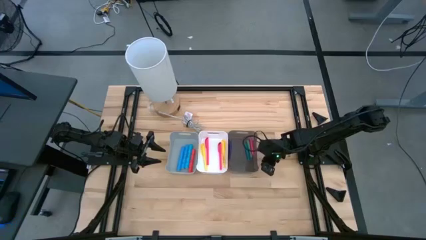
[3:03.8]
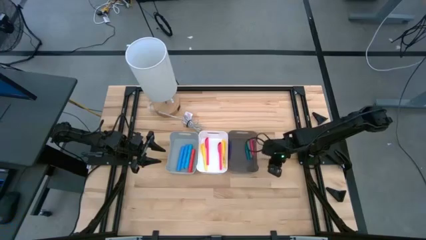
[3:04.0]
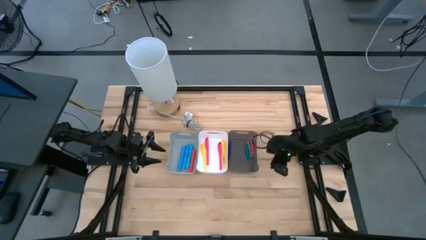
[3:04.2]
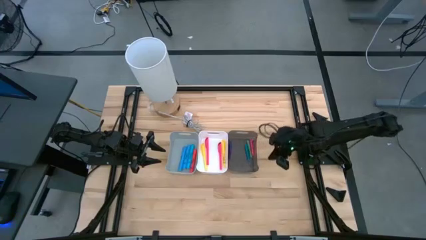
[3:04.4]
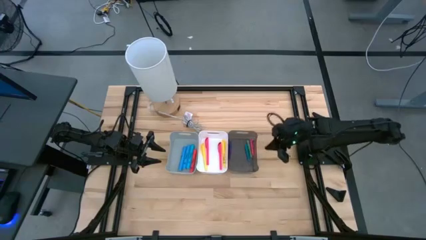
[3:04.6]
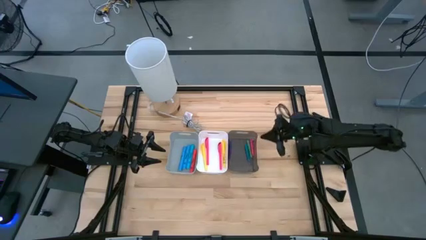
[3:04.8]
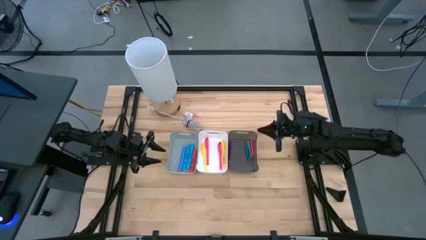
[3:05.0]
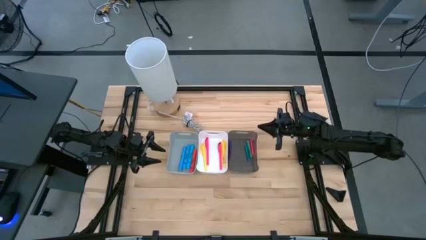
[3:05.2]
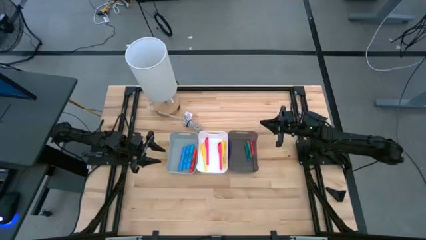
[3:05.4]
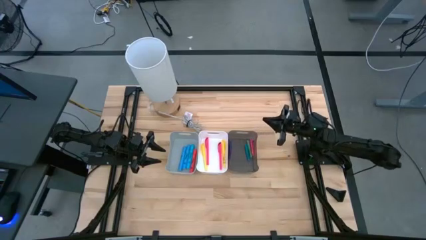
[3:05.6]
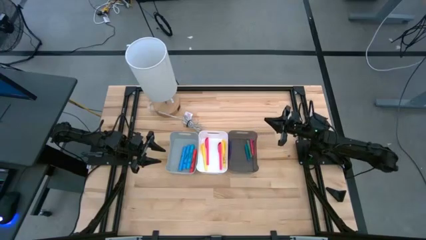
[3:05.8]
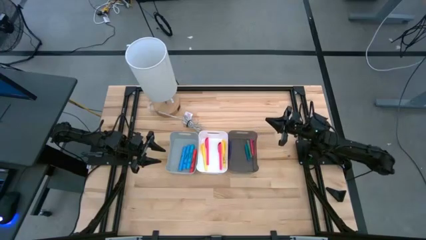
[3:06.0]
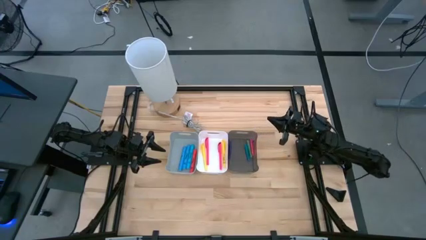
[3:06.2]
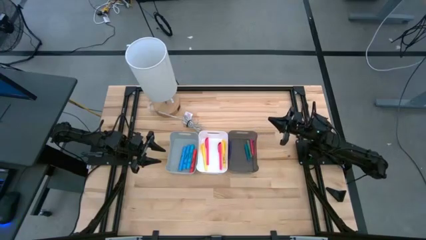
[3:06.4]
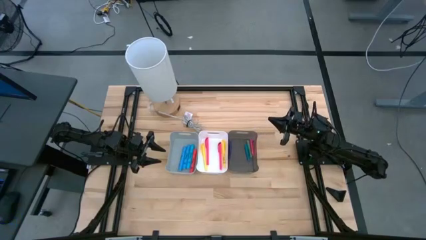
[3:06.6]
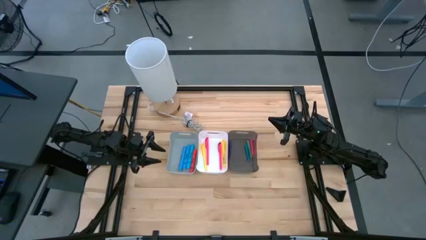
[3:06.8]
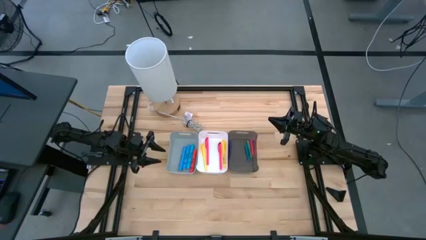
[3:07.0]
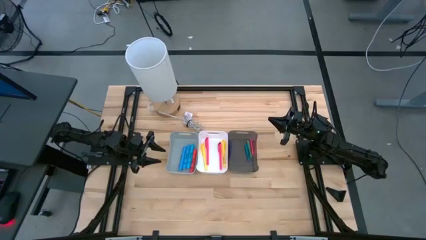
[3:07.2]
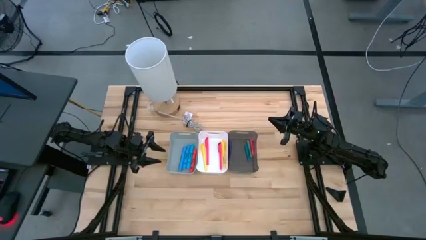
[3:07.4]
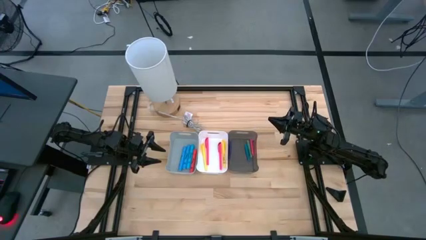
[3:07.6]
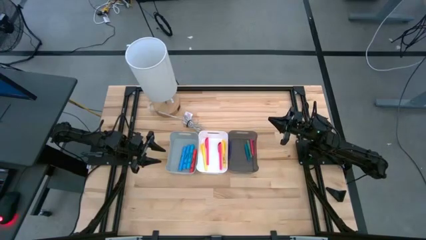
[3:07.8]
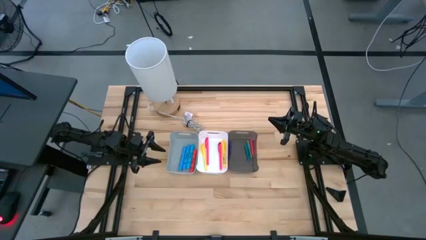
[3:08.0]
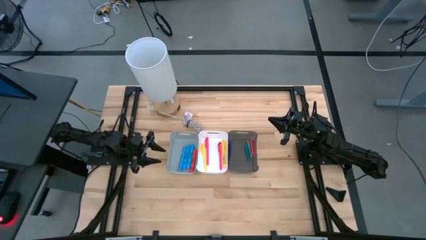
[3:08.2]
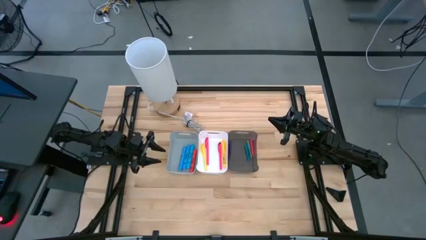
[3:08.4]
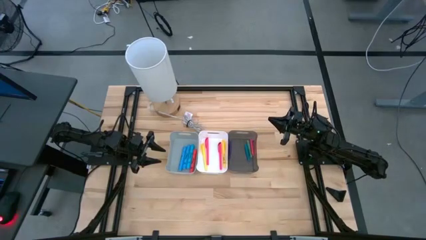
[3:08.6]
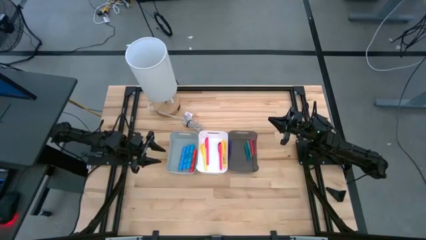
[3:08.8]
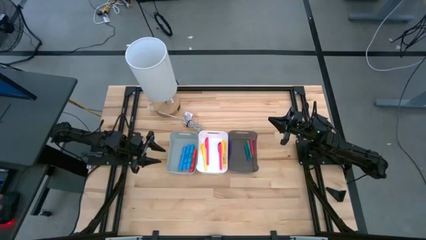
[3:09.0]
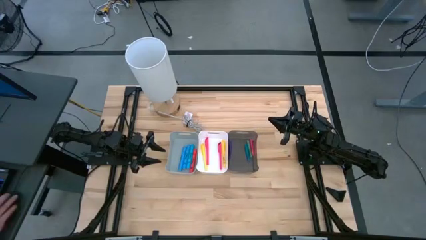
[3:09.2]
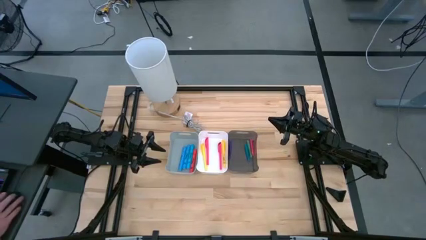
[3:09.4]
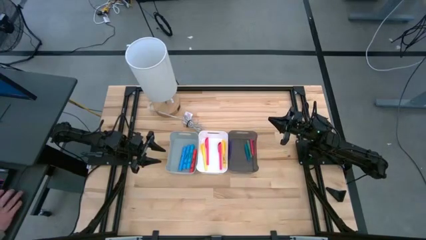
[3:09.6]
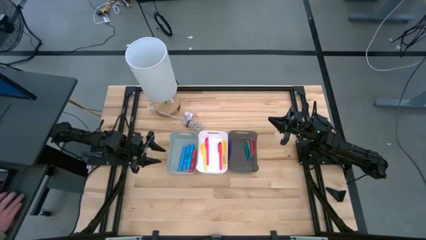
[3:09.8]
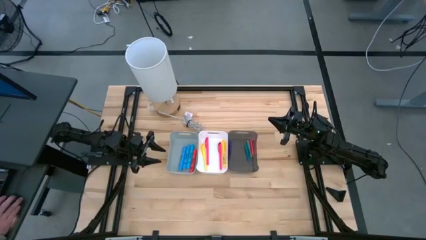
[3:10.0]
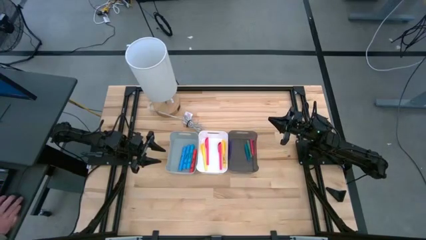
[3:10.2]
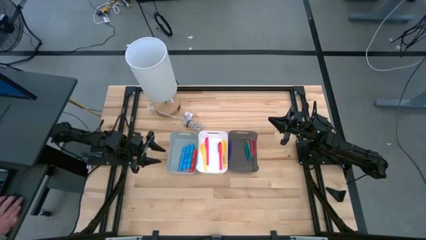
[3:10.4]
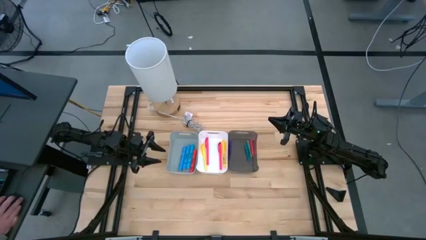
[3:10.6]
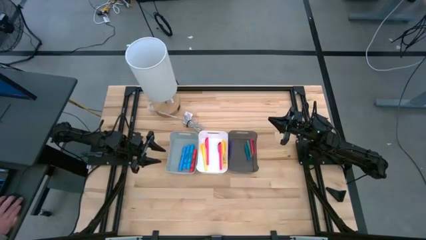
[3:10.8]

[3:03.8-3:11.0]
Task: Pick & Place Markers
Return to Home Position

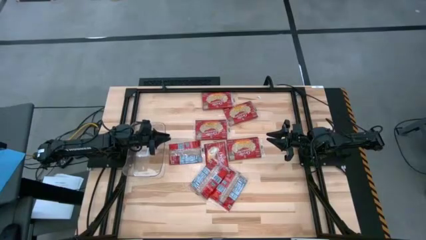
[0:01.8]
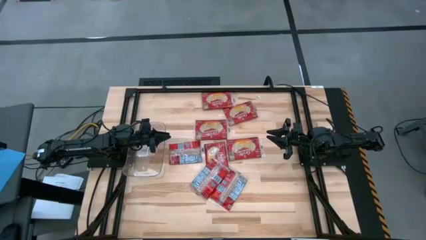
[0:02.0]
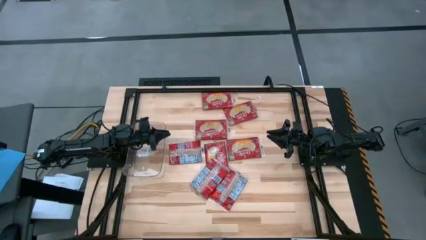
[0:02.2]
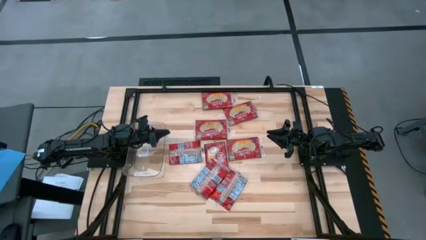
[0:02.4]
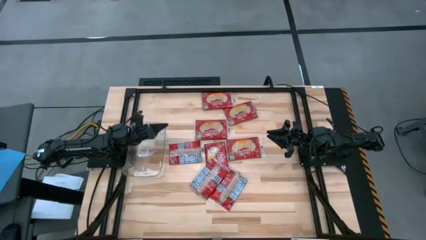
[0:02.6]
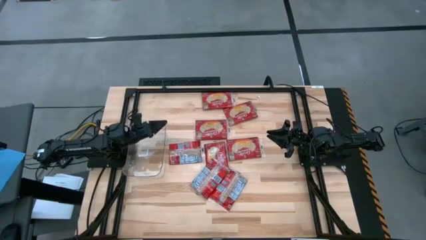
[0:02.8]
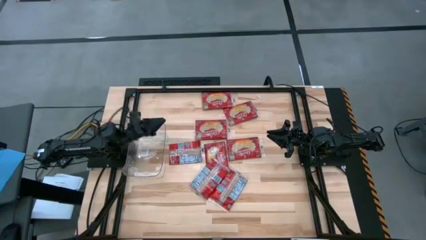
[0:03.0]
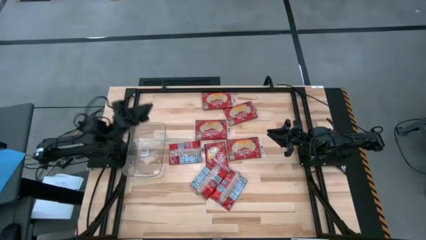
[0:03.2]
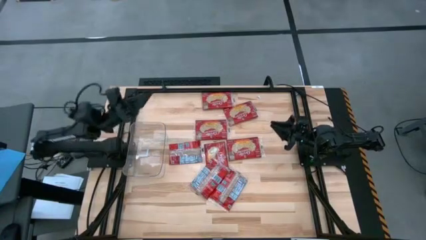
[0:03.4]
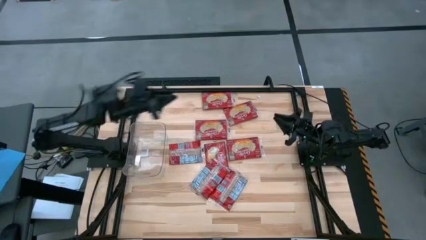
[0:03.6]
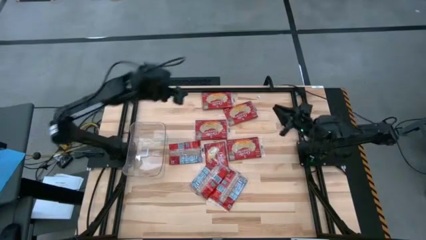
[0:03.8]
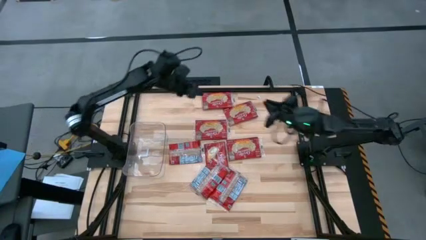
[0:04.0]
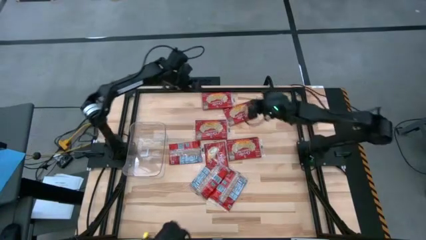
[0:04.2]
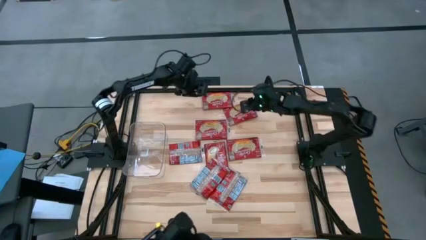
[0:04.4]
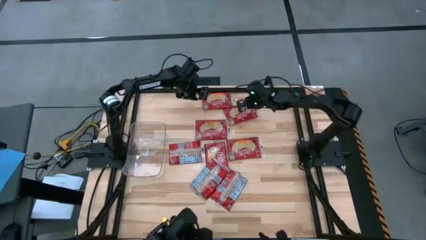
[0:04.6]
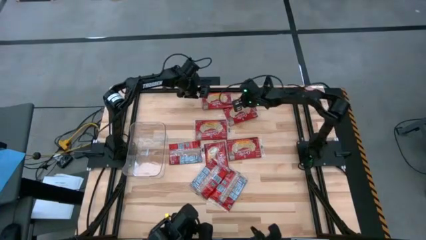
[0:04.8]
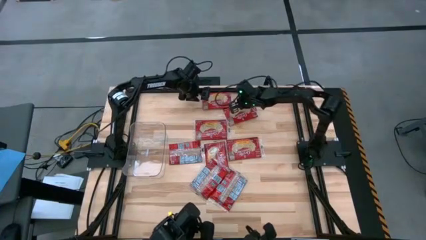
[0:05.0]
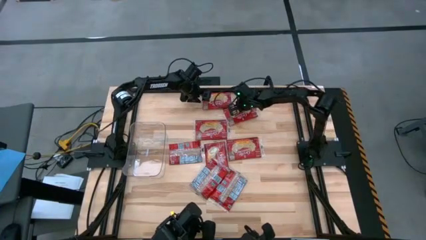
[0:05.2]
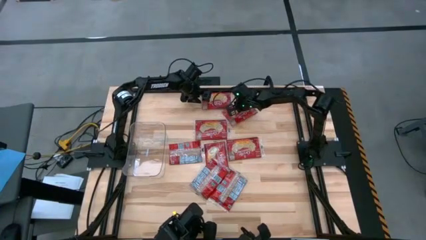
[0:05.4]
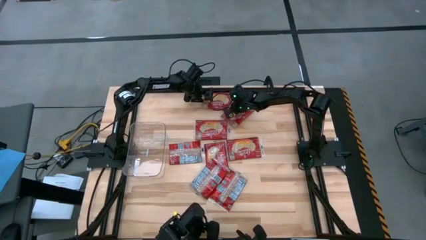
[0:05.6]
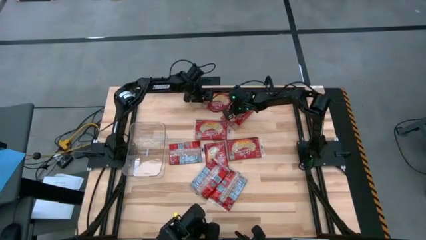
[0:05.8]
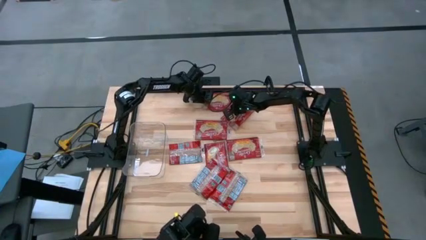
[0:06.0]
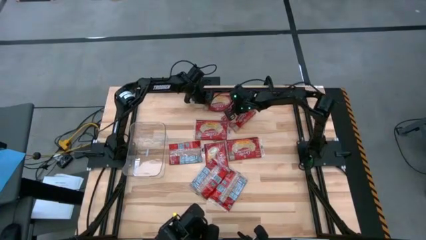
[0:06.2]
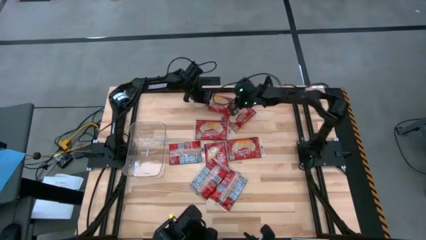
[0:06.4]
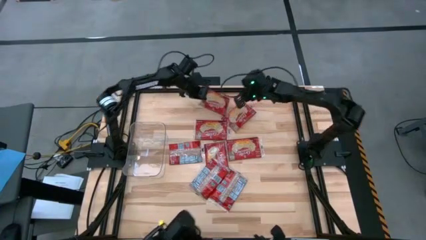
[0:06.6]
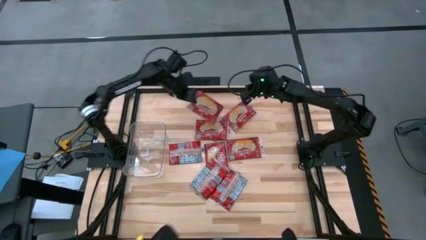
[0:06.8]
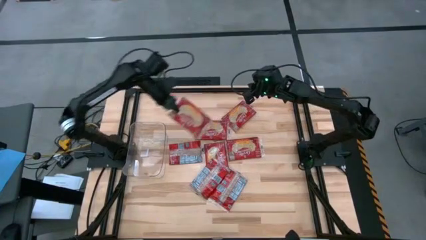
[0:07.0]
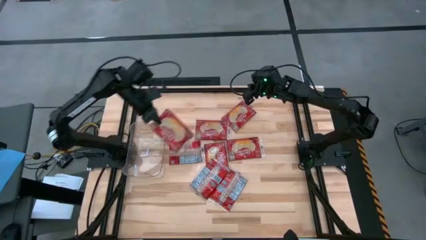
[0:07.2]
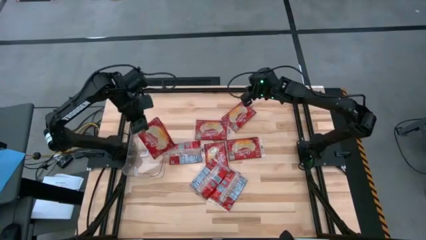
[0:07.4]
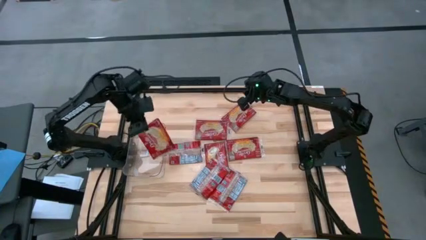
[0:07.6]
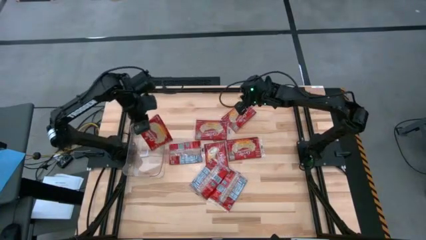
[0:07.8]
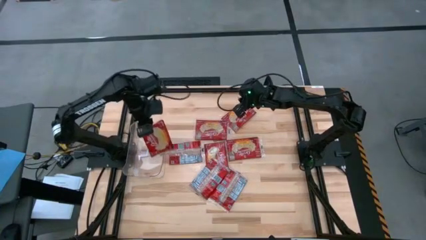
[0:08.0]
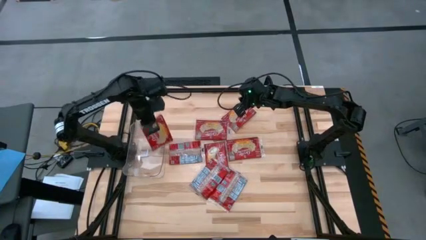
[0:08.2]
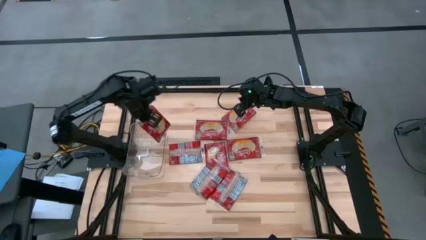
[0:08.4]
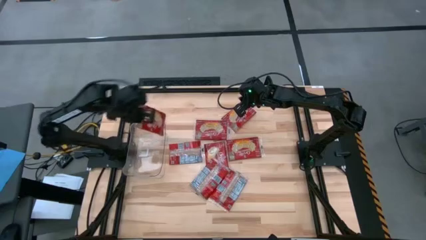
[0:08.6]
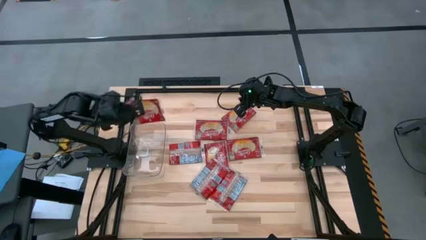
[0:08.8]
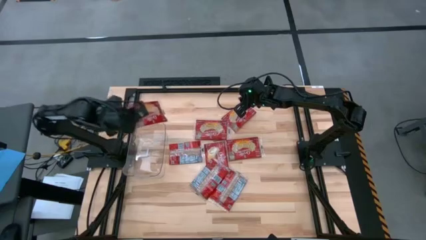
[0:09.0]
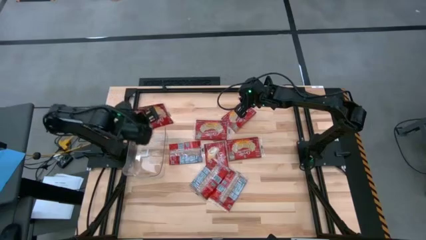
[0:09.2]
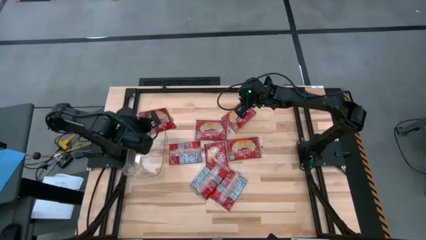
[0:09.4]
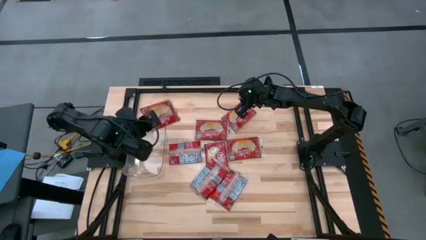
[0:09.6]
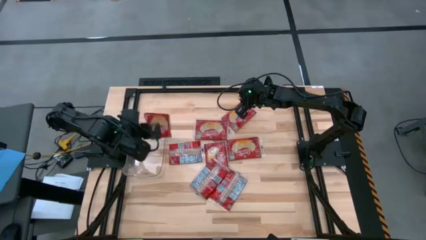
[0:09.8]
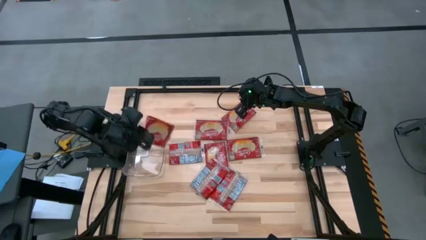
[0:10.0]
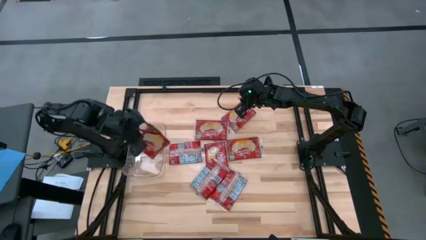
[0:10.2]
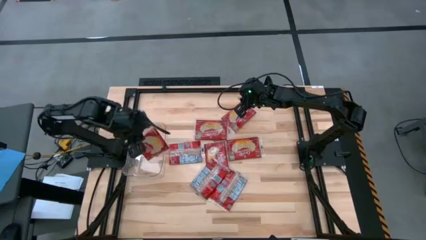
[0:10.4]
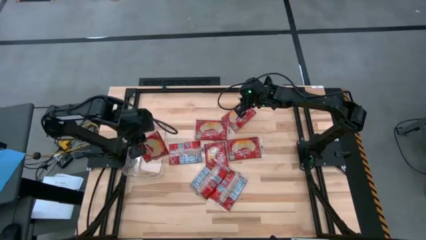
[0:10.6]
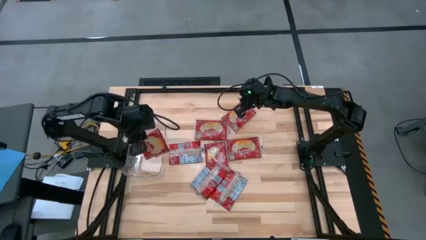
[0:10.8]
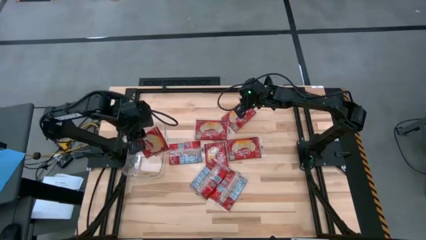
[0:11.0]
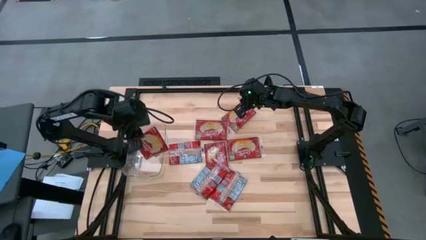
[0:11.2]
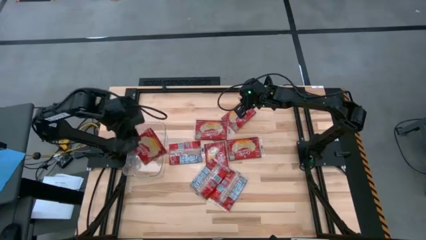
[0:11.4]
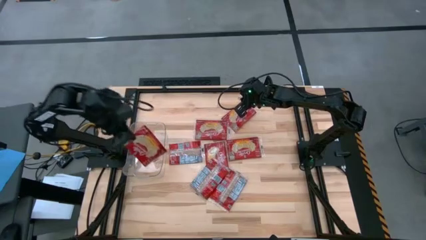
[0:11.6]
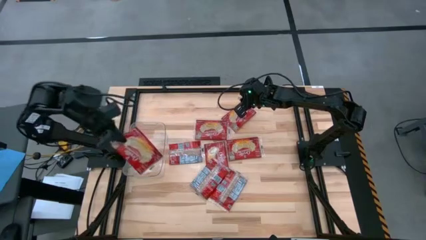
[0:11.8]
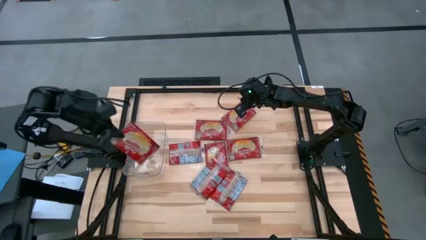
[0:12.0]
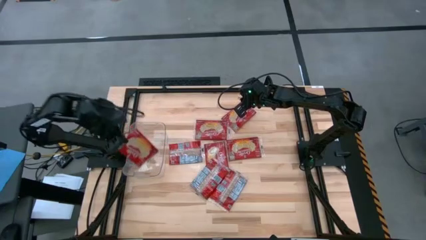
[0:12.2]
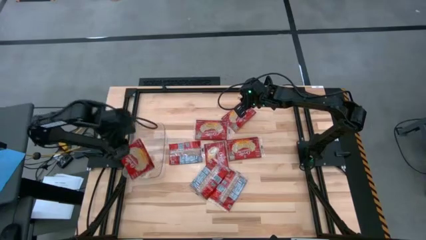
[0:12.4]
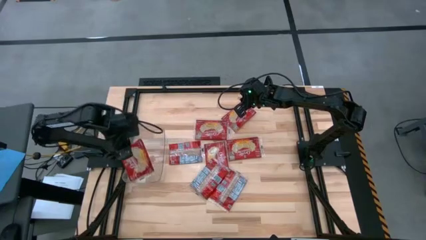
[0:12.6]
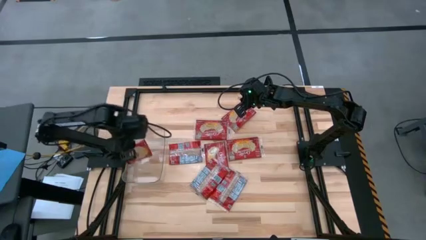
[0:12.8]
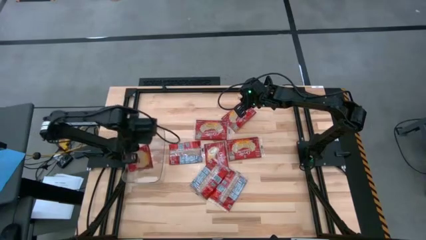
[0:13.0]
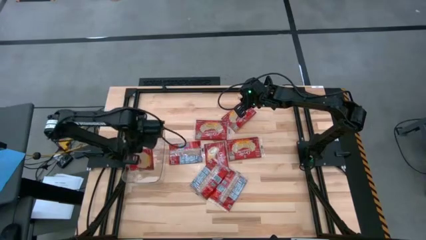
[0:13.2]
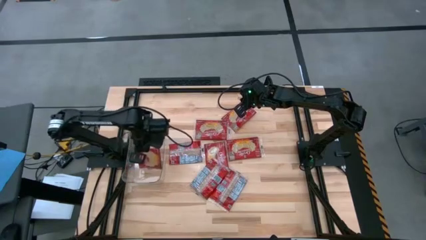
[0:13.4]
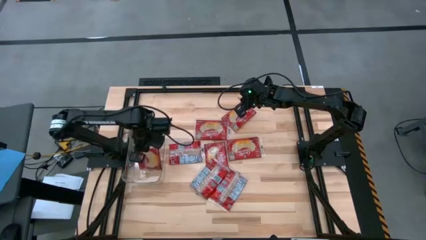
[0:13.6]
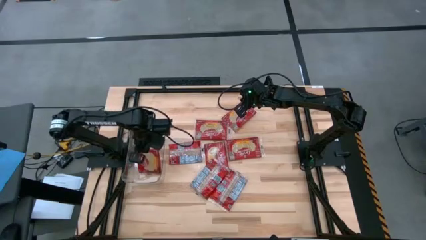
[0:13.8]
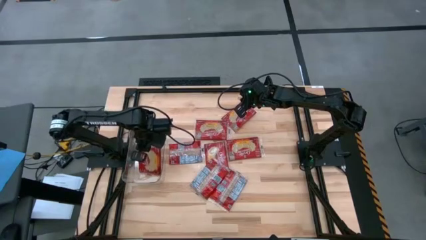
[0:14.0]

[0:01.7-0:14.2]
Task: Sort popcorn bags into baskets
Put the red popcorn bag into the transparent bin
